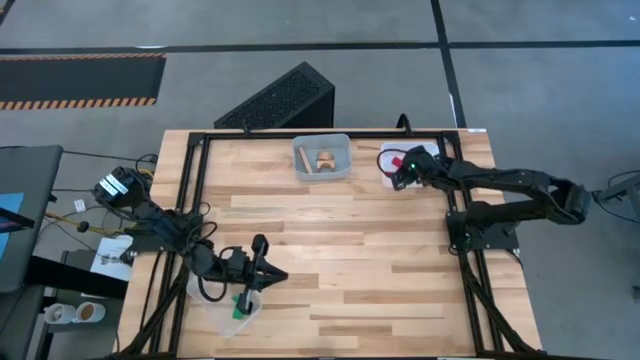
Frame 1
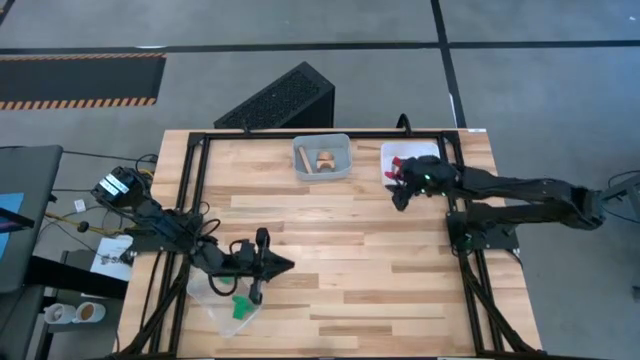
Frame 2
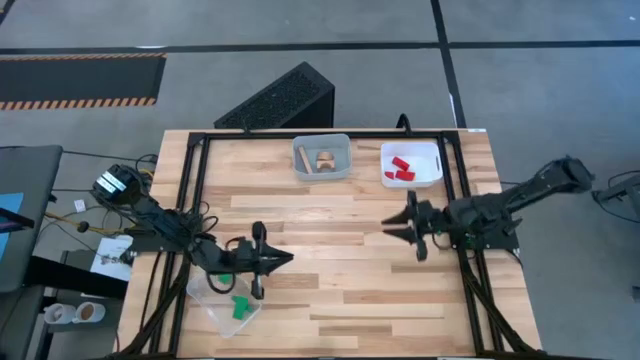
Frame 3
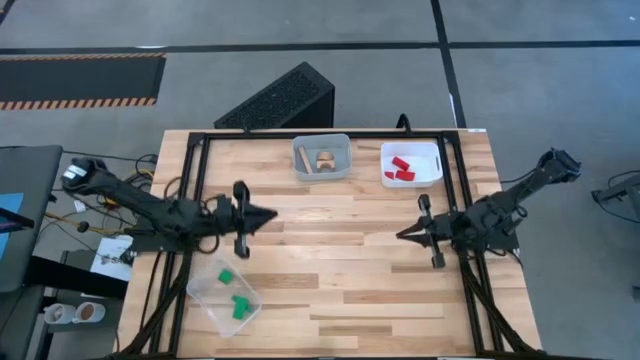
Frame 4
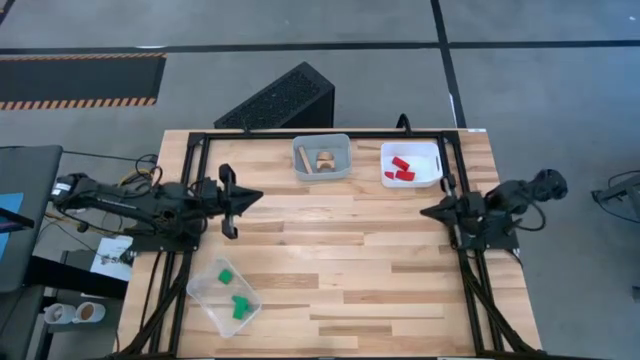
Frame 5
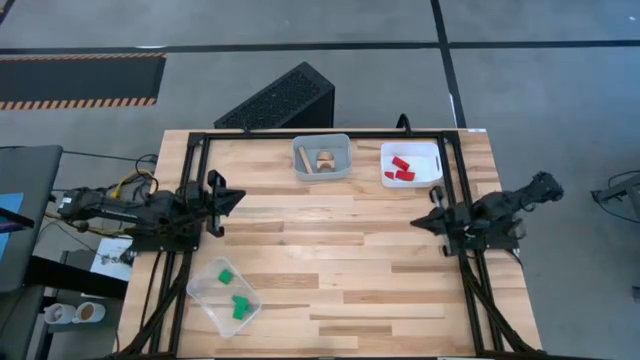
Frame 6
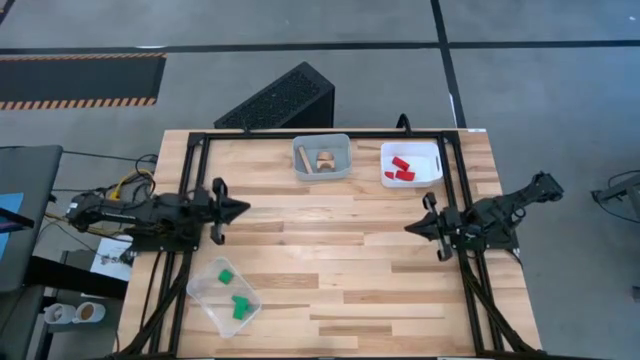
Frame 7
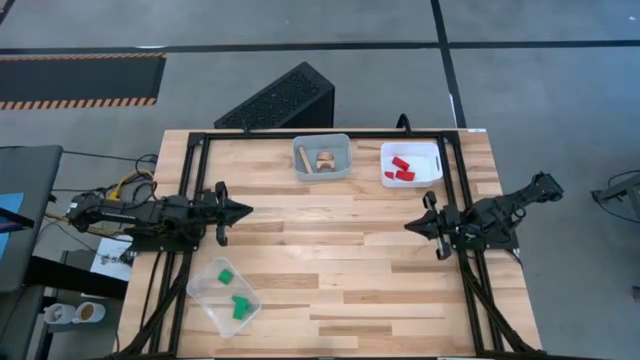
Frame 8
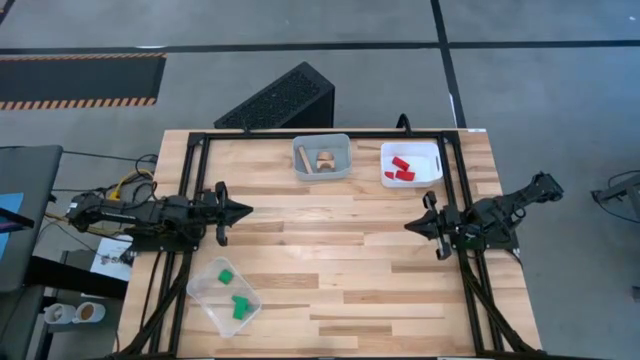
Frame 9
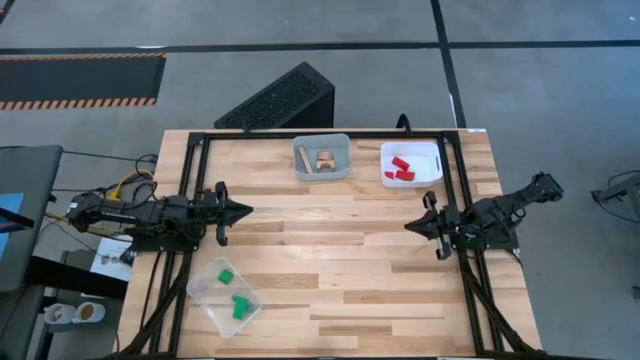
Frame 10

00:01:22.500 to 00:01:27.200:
Task: Sort & place blocks by color
Return to Home Position

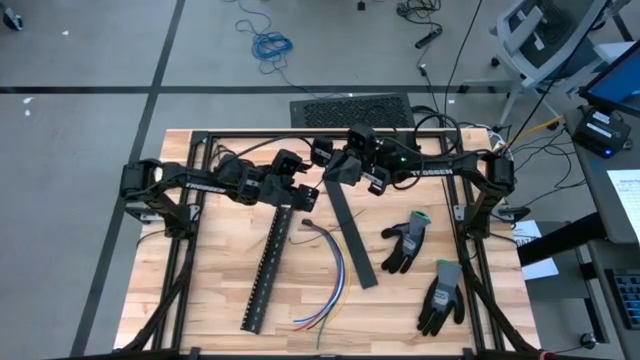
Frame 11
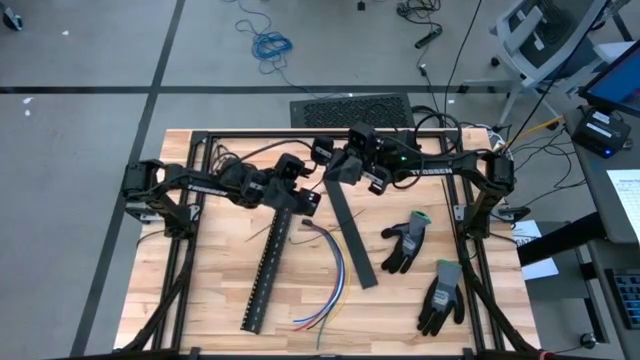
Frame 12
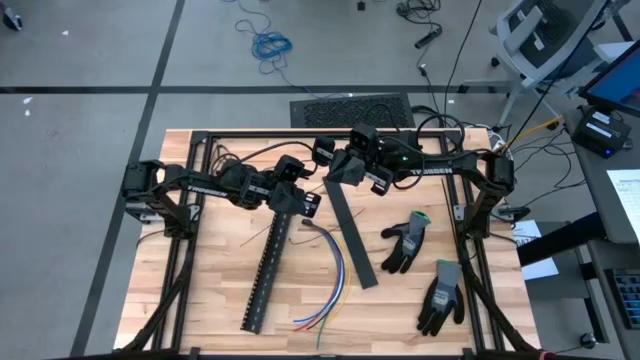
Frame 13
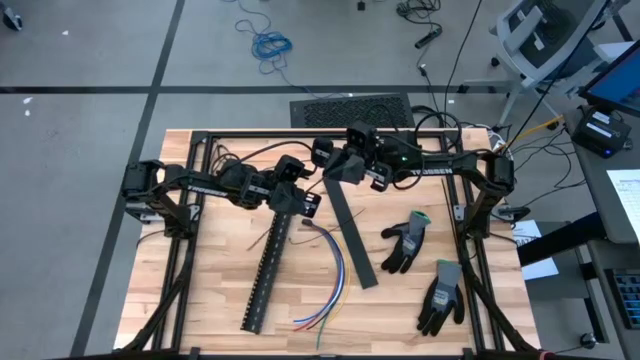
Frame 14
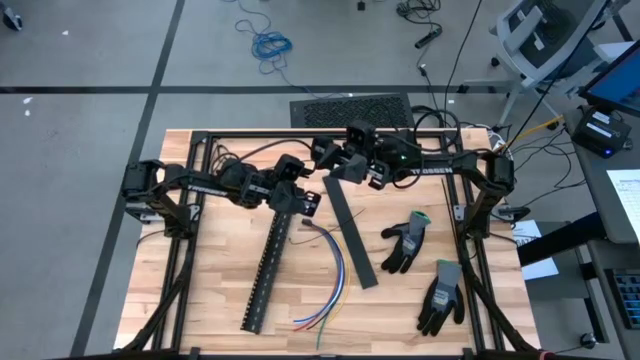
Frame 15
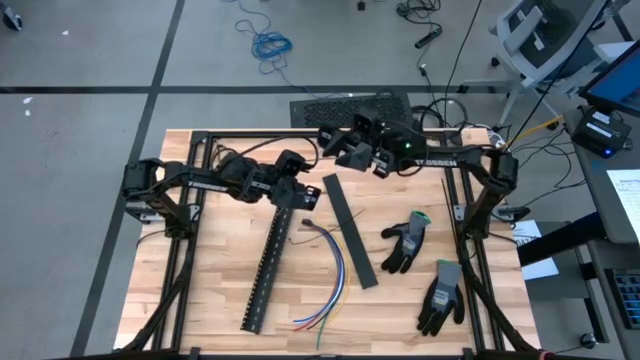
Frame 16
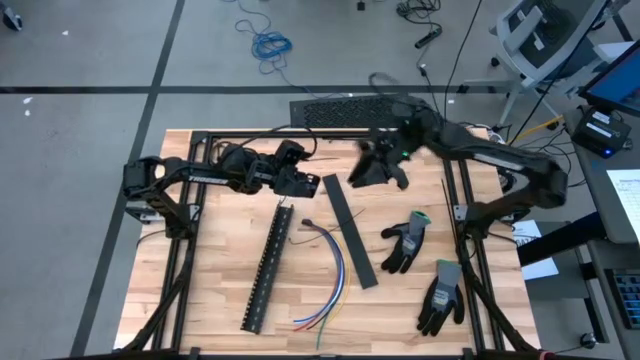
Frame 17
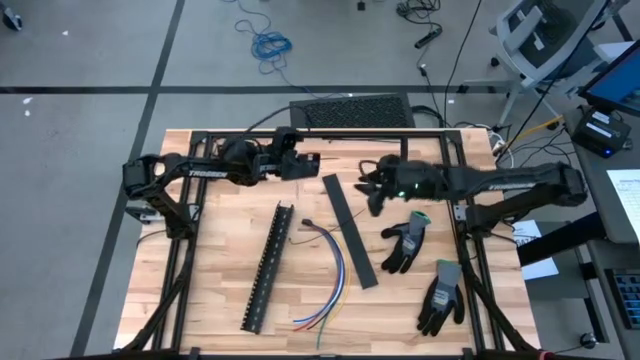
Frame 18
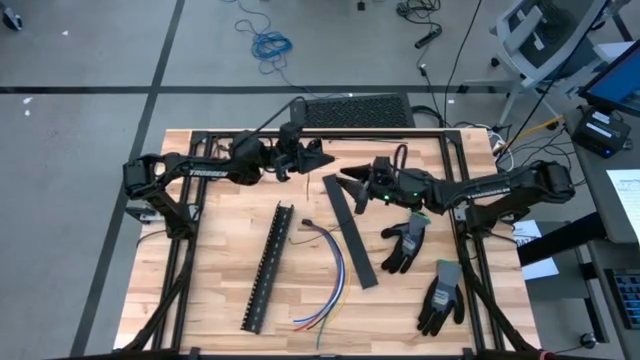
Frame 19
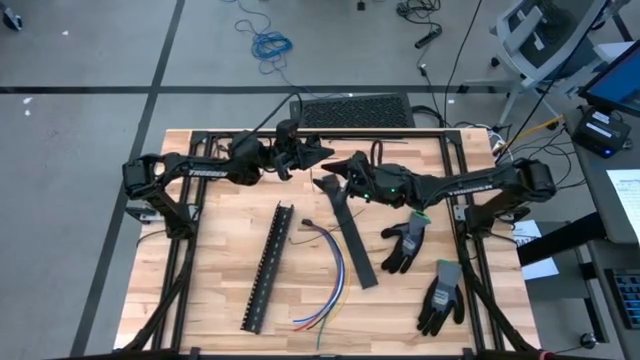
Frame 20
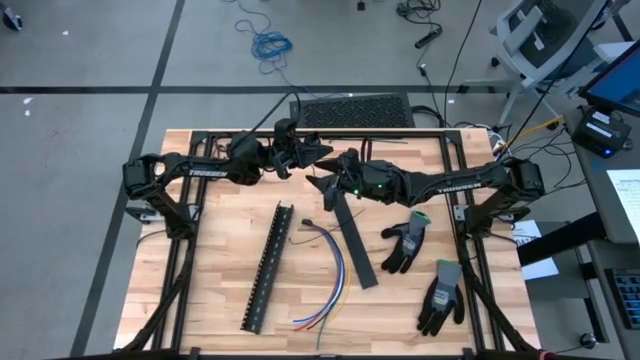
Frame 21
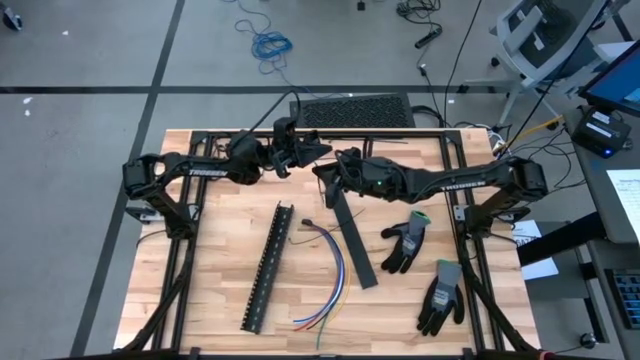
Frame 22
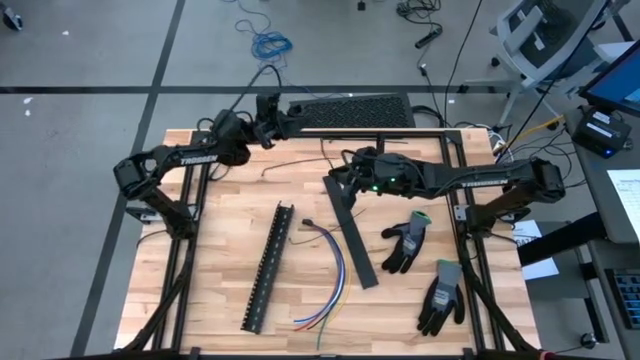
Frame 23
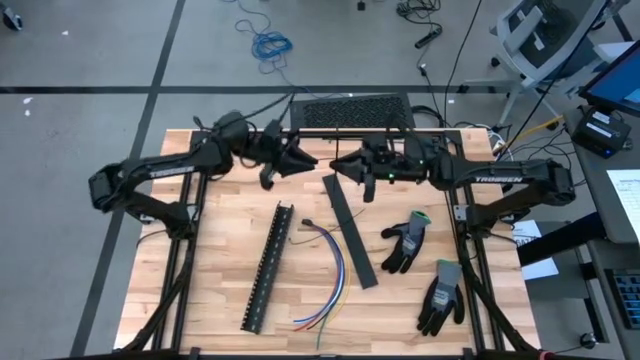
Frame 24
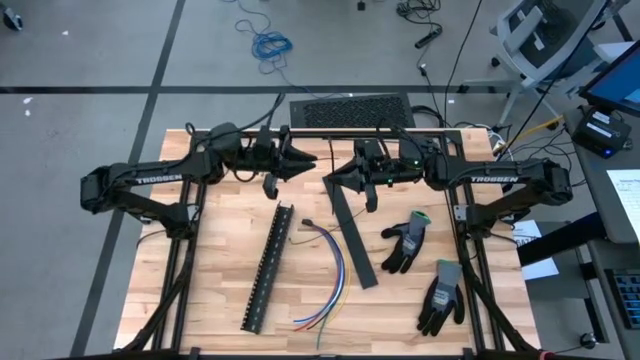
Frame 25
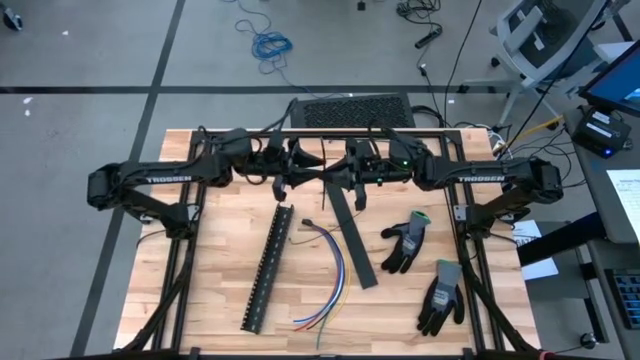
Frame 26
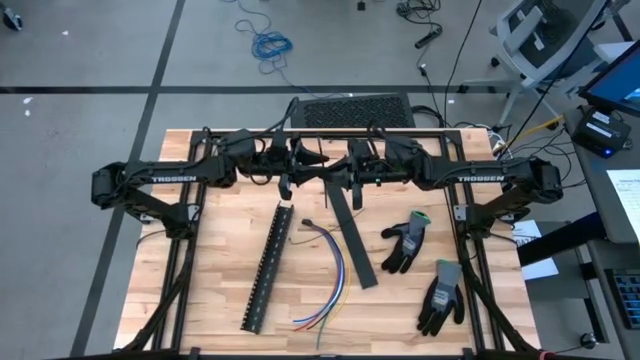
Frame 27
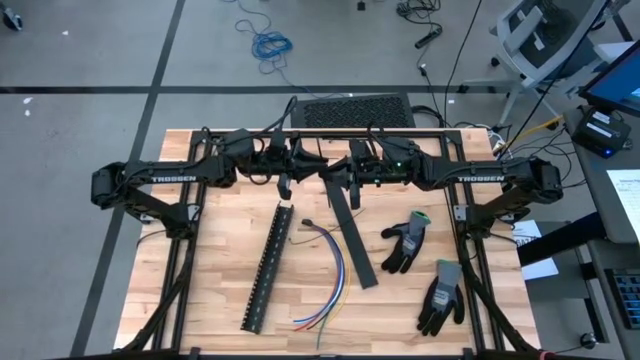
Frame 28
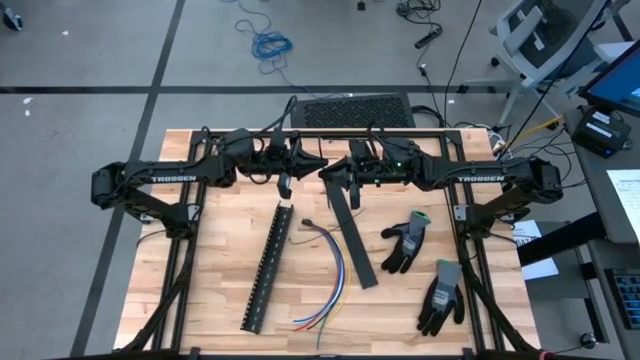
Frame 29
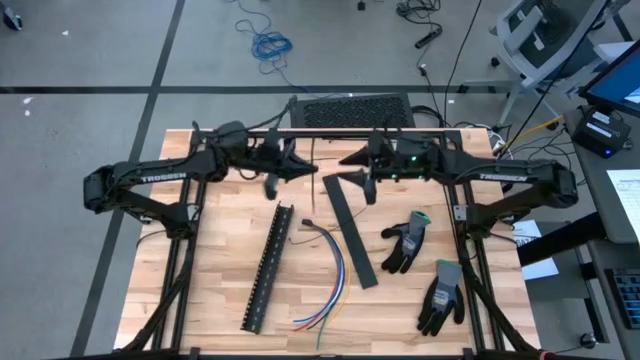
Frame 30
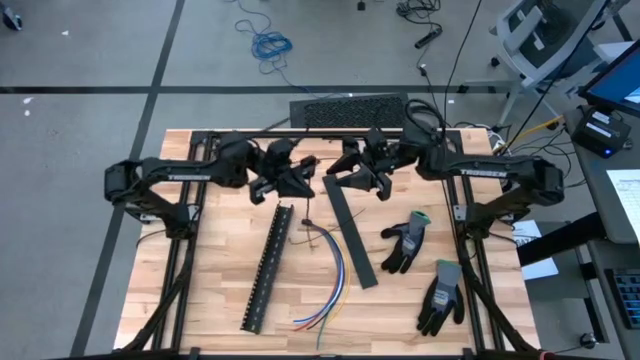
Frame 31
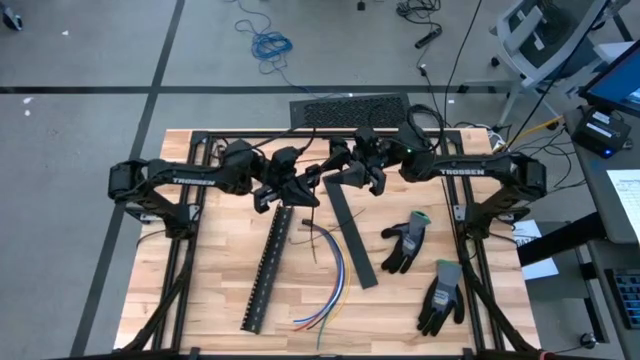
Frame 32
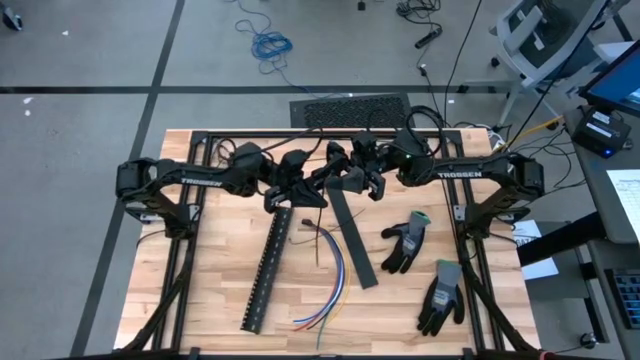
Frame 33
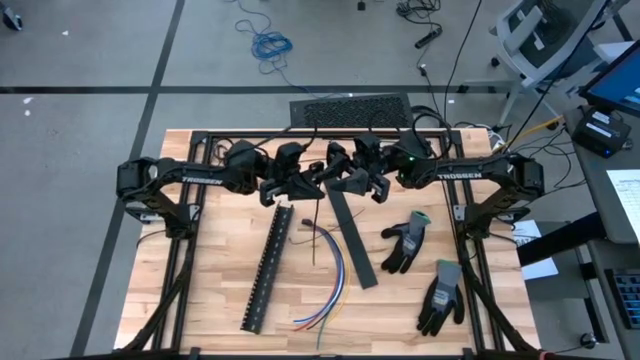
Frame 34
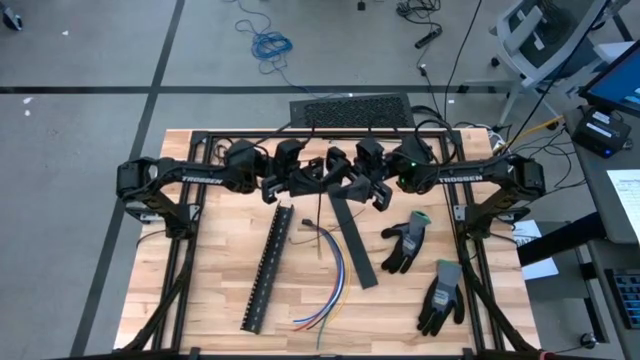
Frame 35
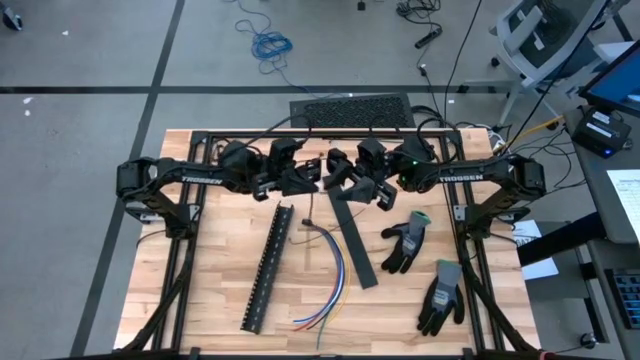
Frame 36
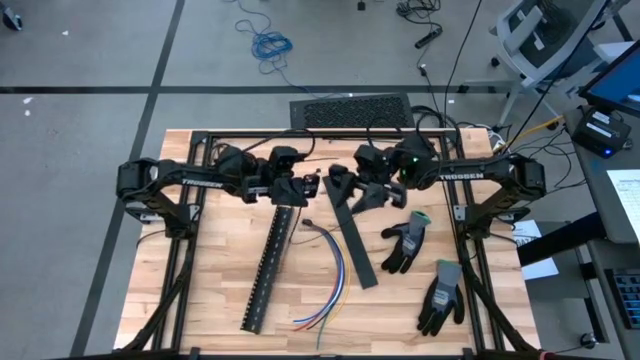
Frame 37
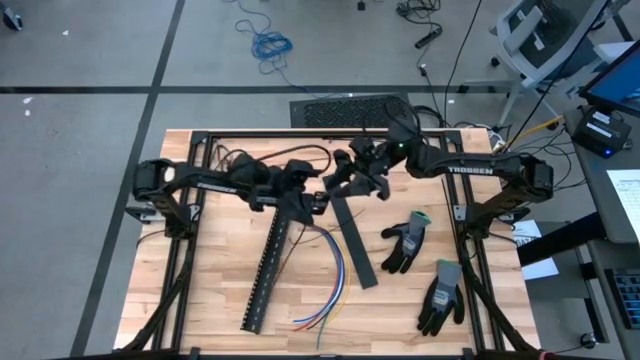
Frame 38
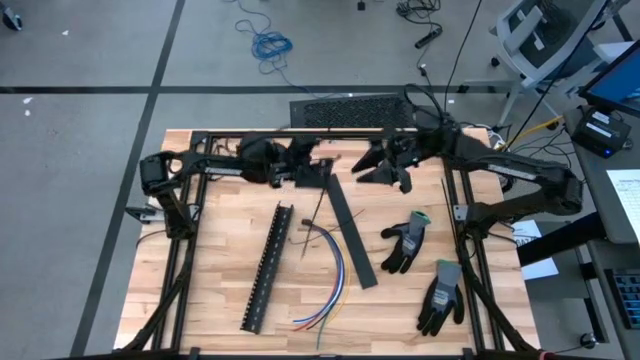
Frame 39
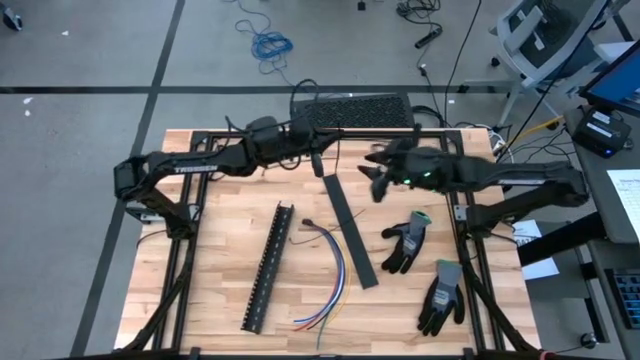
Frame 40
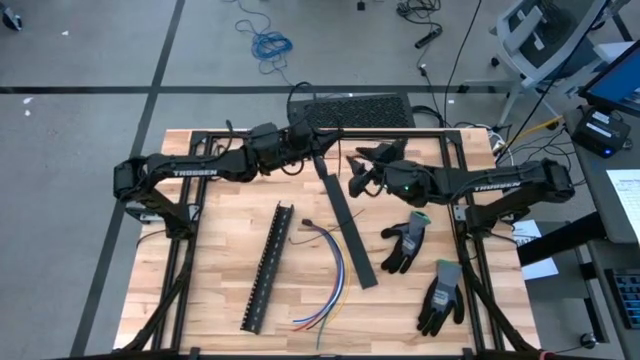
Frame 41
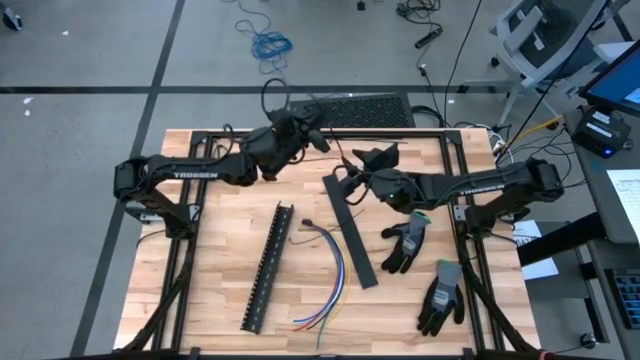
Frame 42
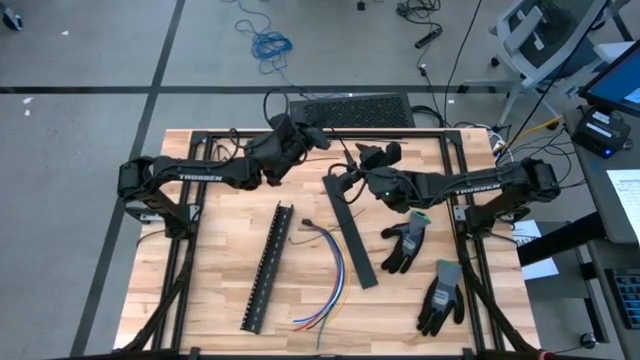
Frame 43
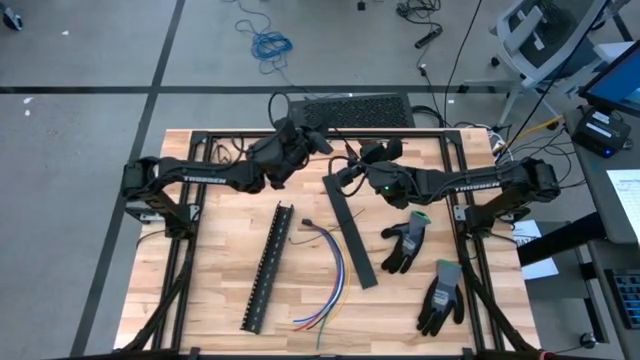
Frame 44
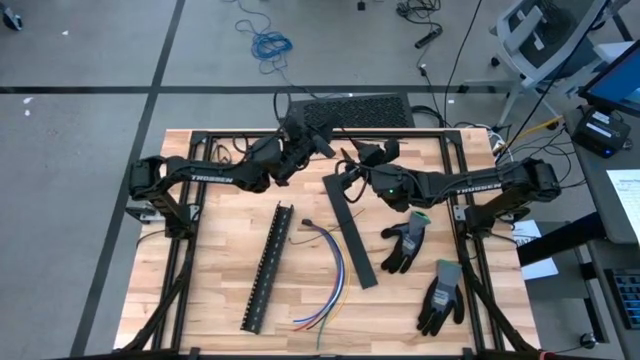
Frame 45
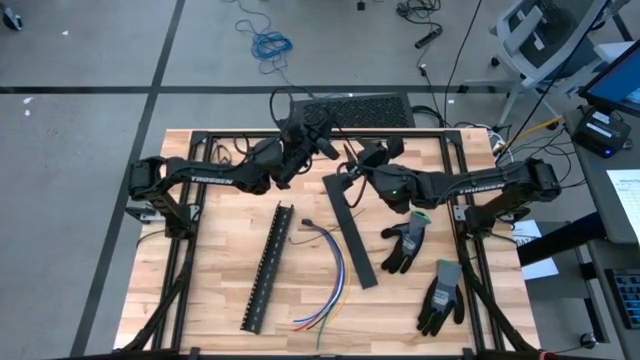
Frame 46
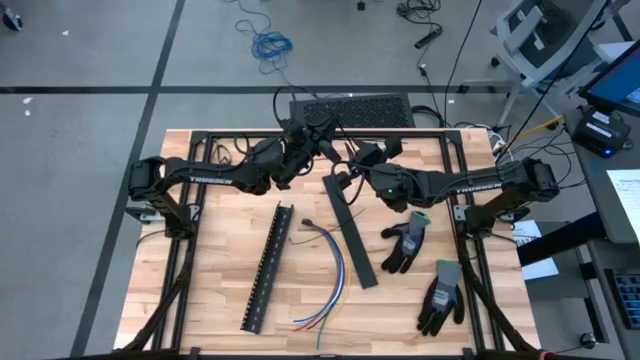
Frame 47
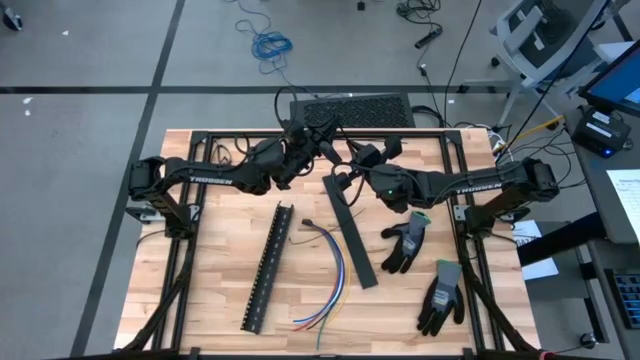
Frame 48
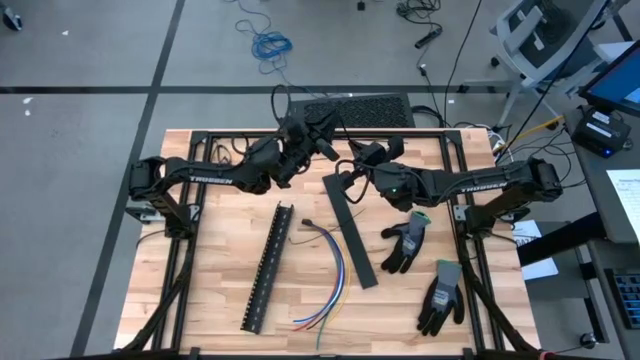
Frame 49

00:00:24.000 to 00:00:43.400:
Task: Ziptie cables
Wrap the black zip tie on the cables
